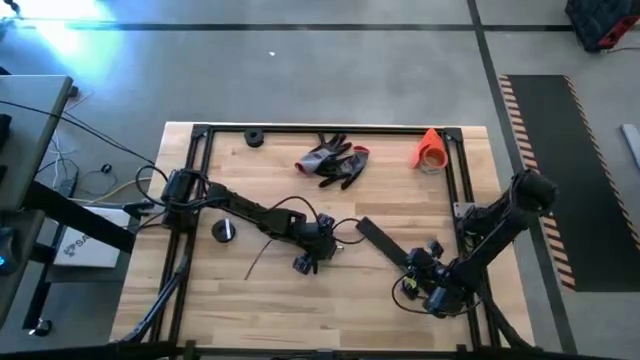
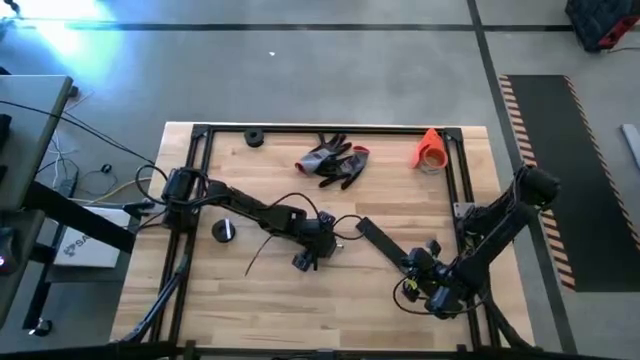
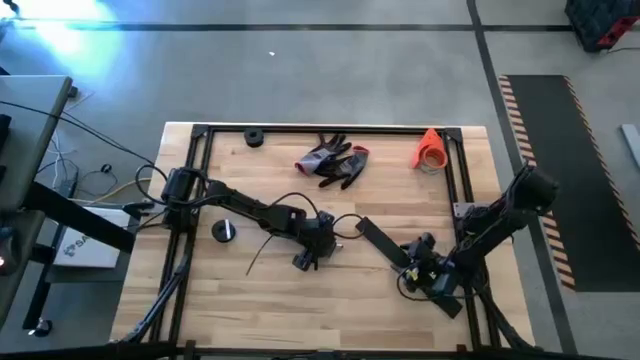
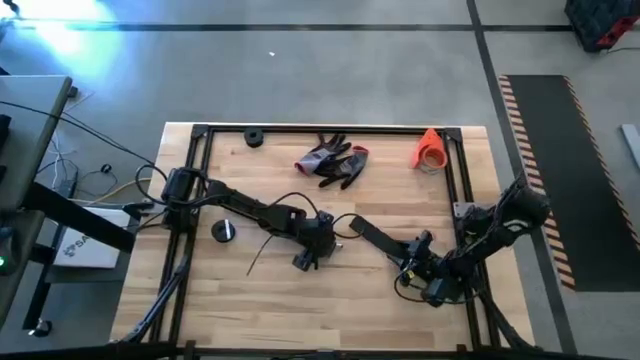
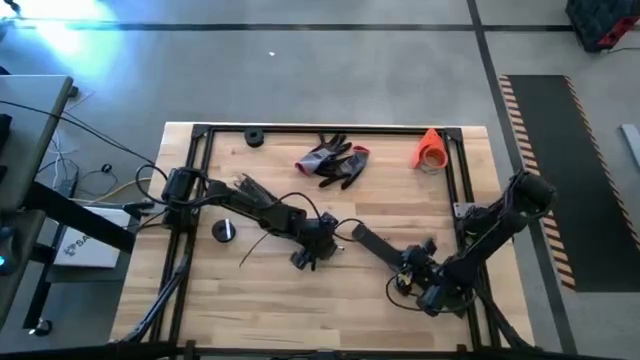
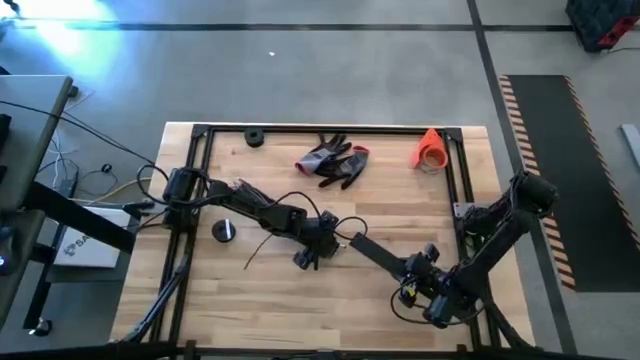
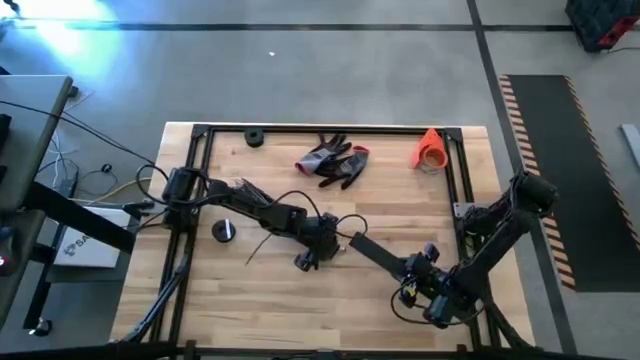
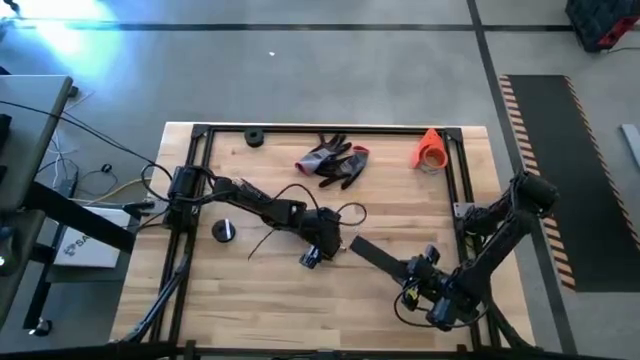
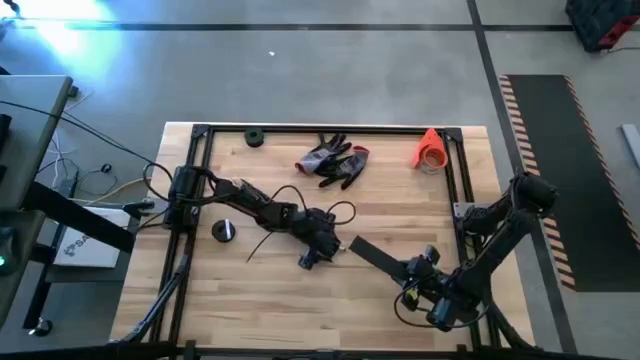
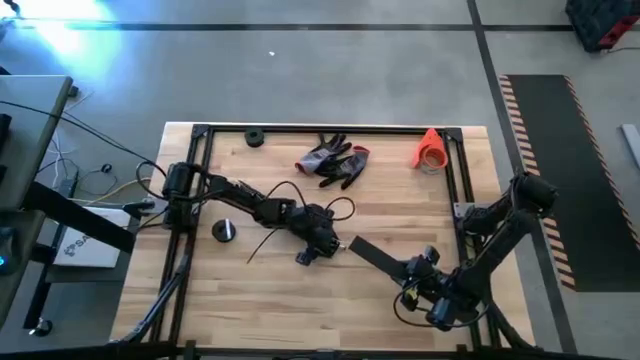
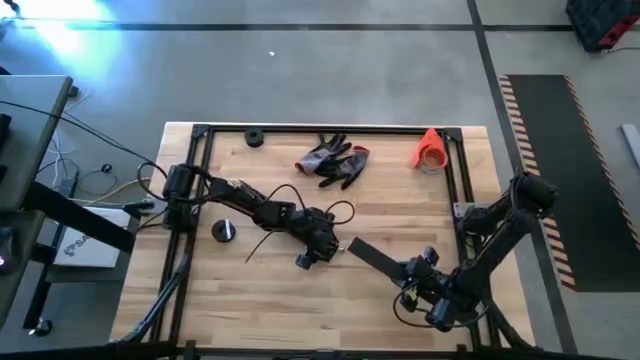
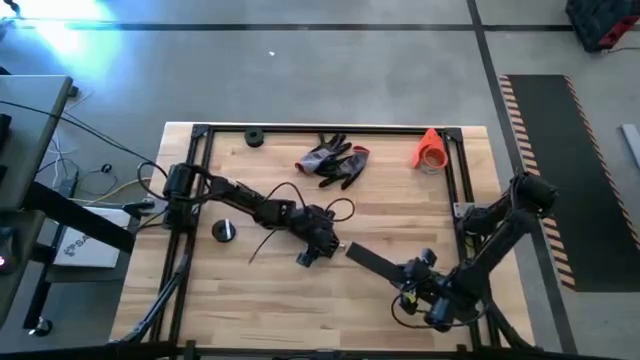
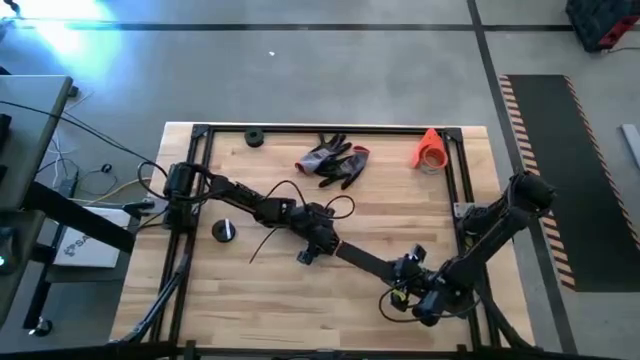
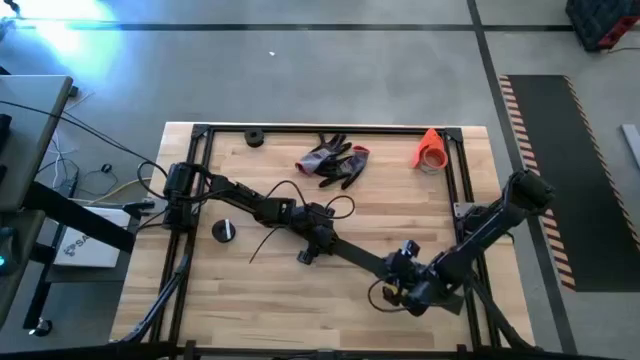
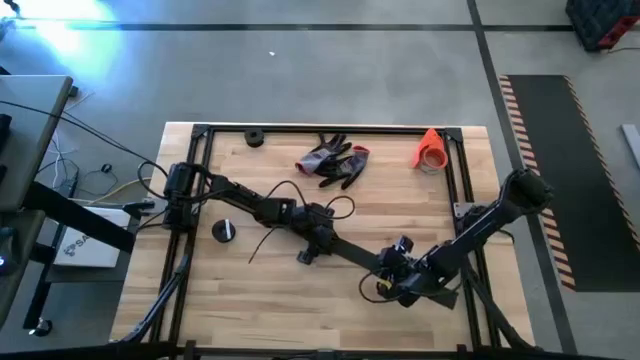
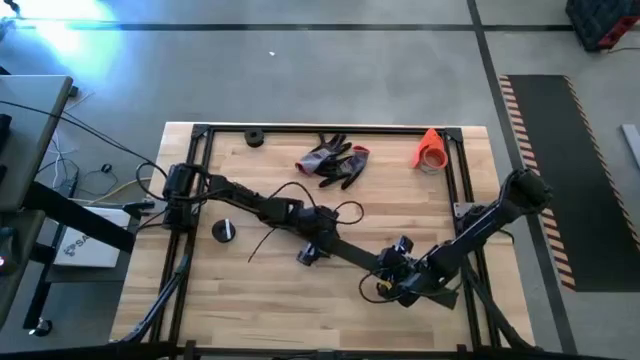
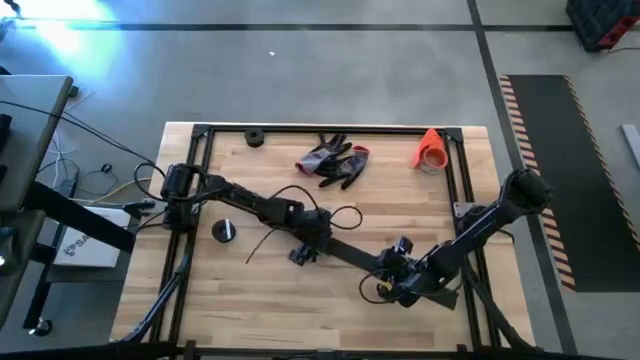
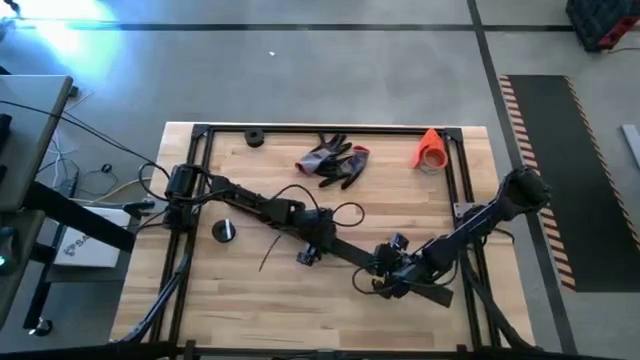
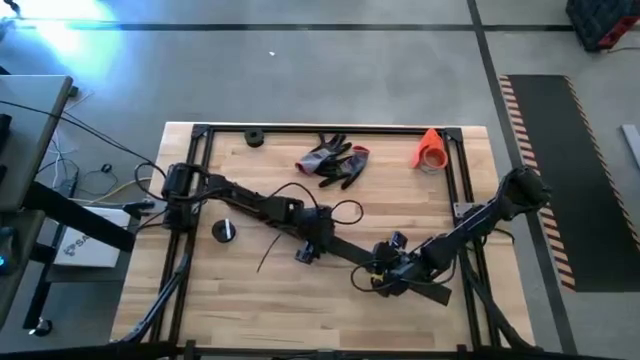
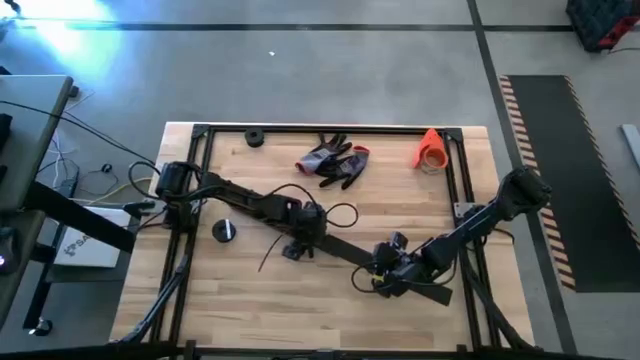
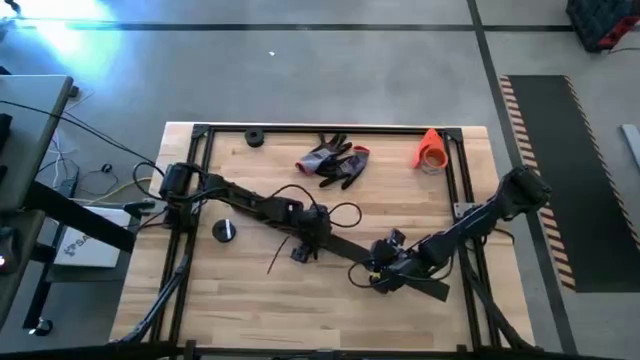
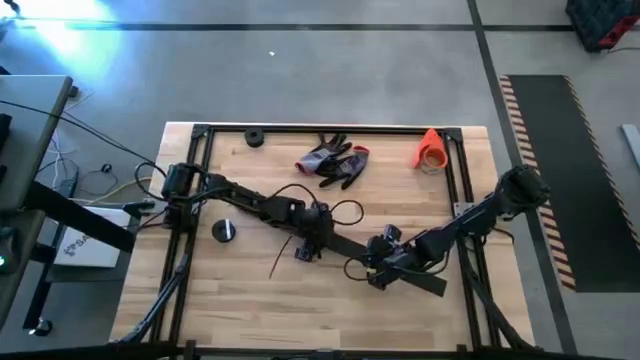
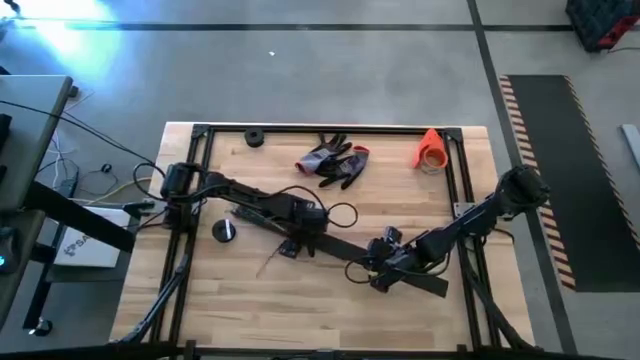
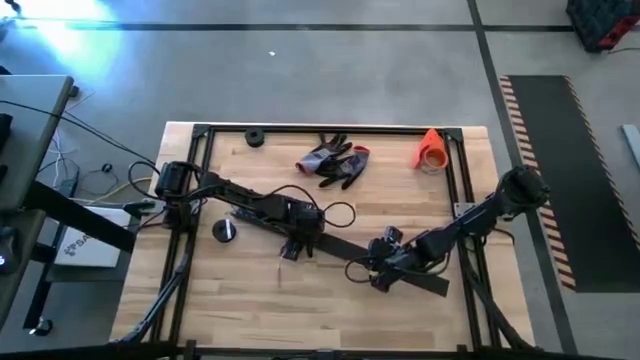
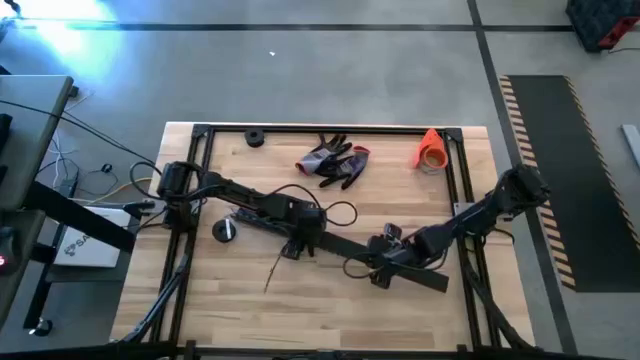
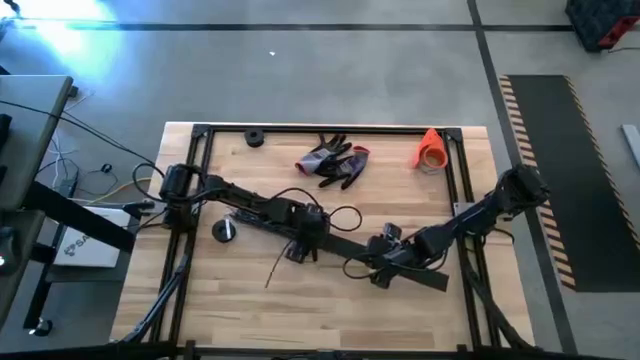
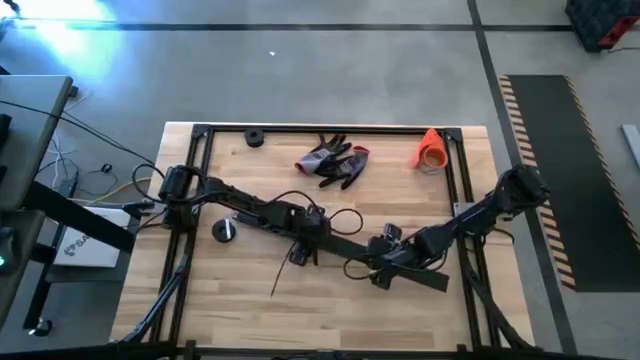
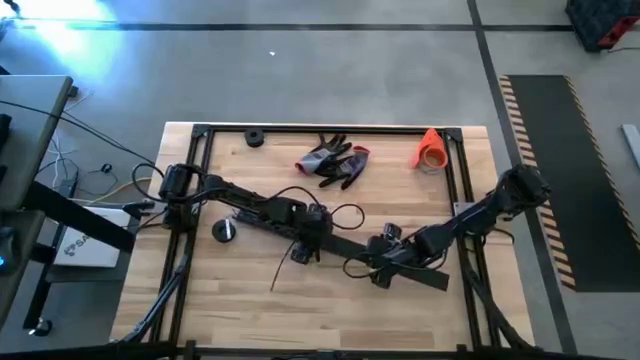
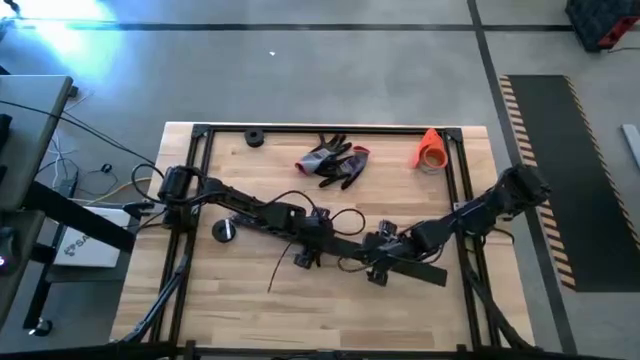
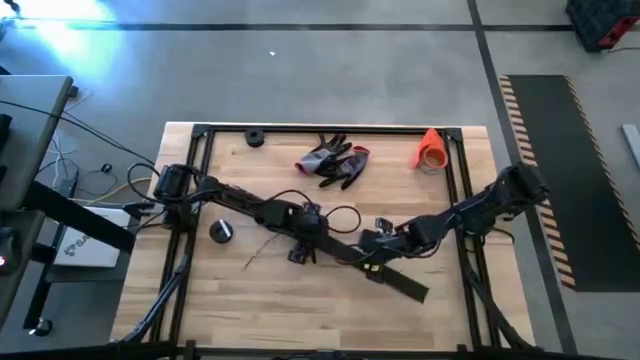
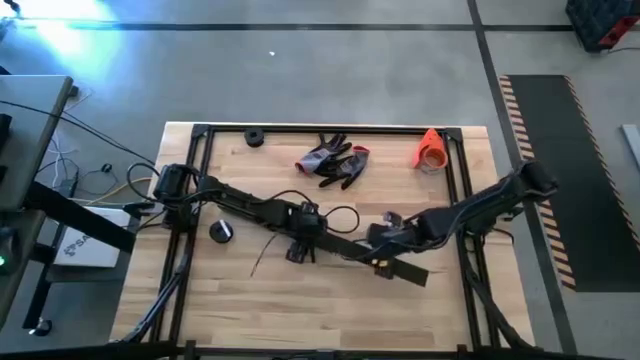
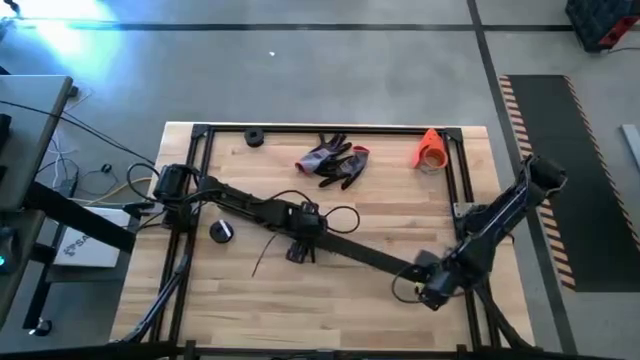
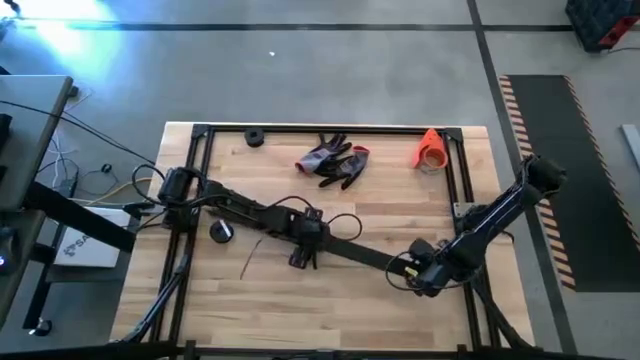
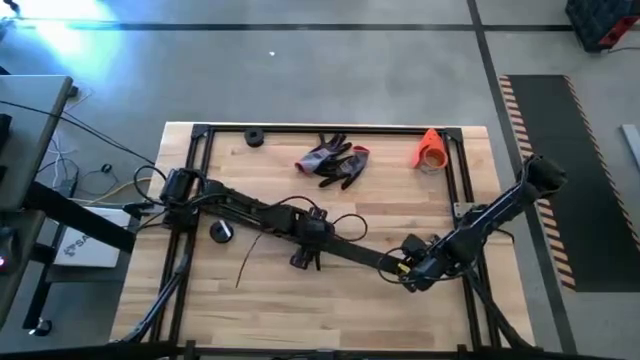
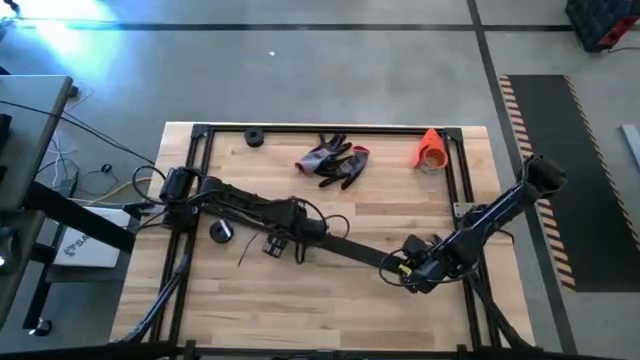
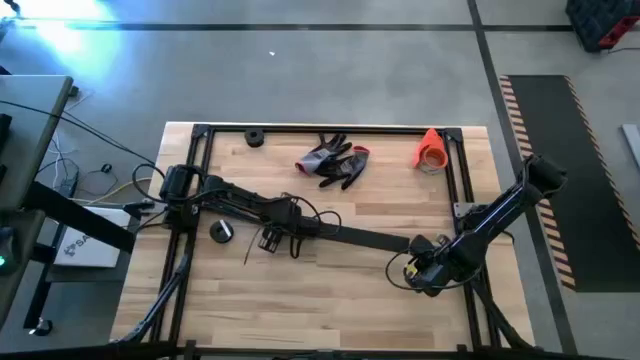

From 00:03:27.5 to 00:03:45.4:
Task: Ziptie cables
Close the black cable duct

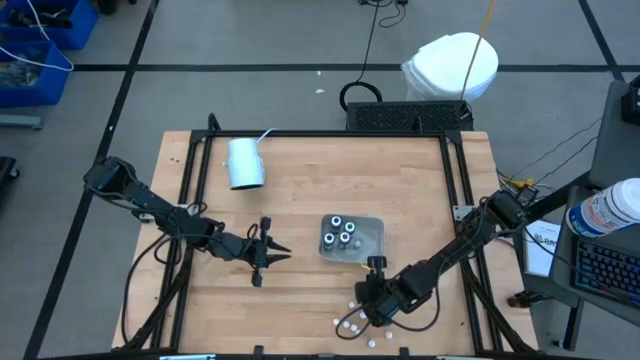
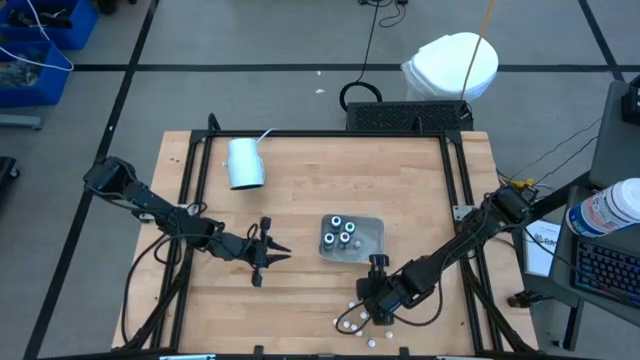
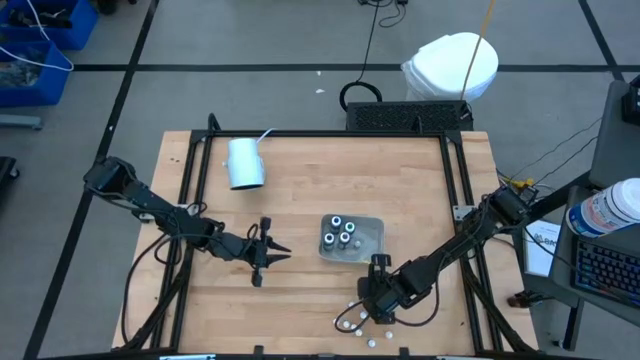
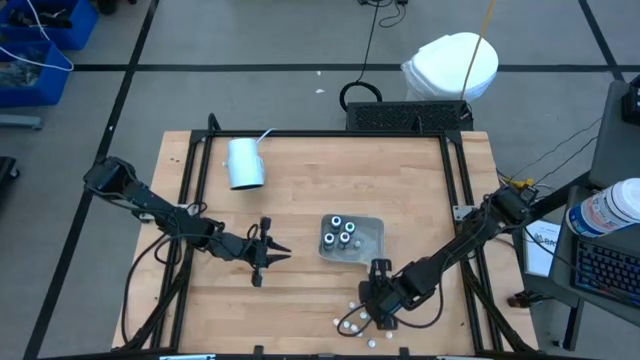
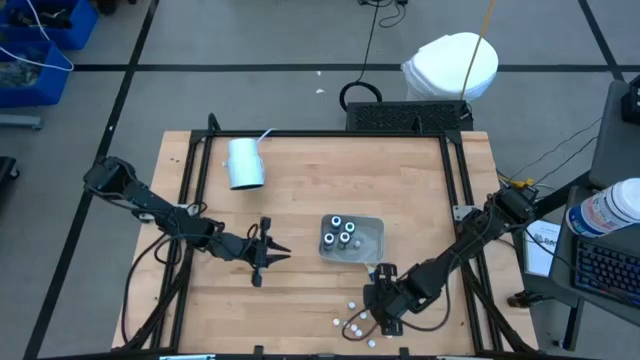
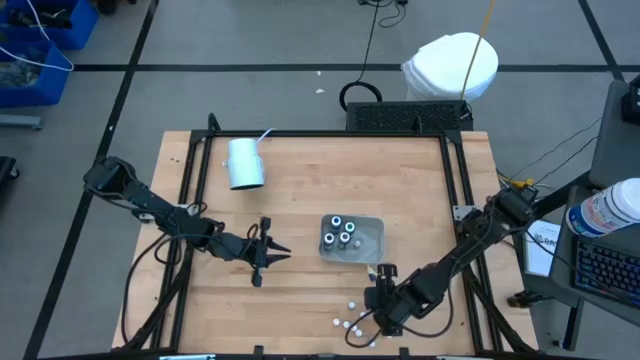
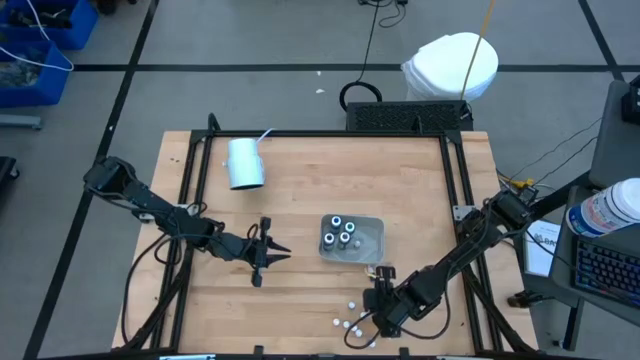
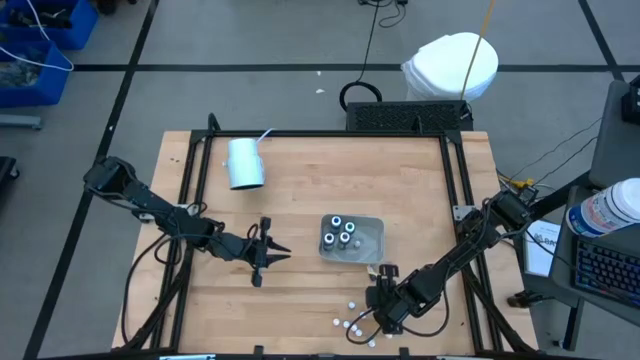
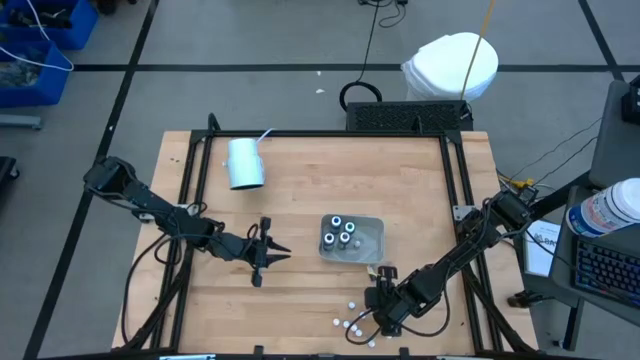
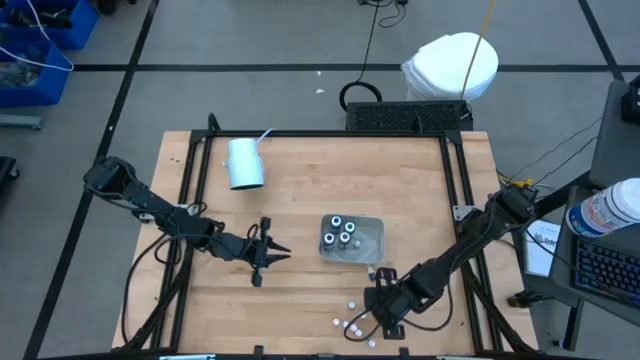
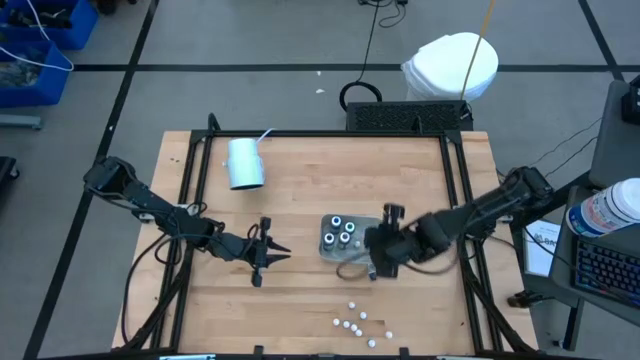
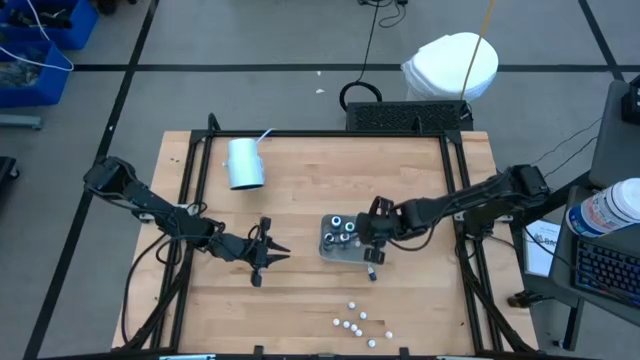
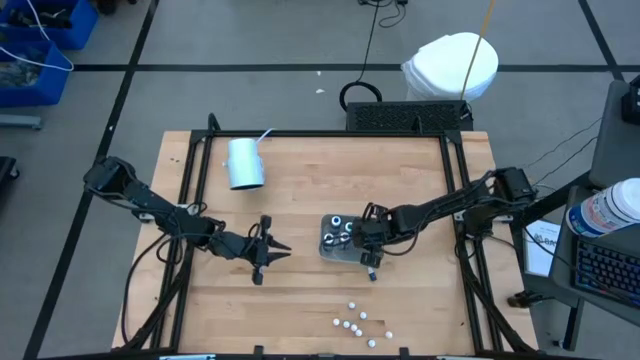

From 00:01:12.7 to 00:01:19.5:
Task: Pick & Place food coloring
Put the small blue food coloring bottle into the gray bin
